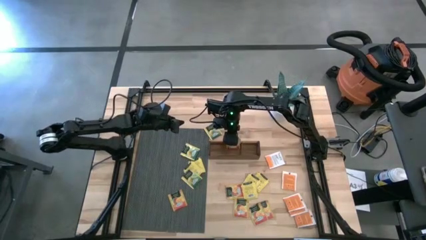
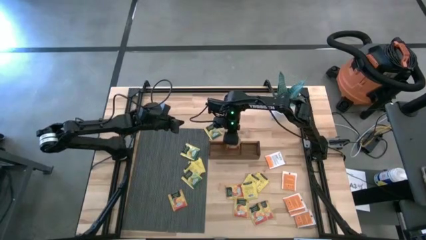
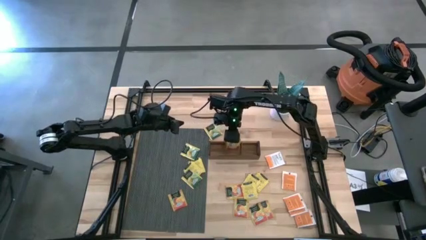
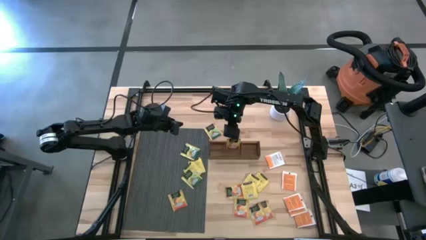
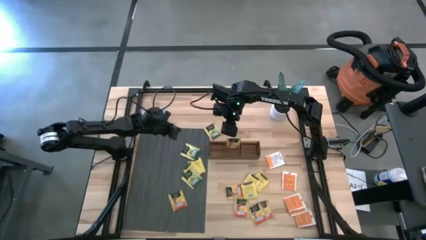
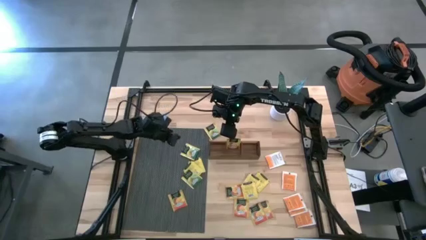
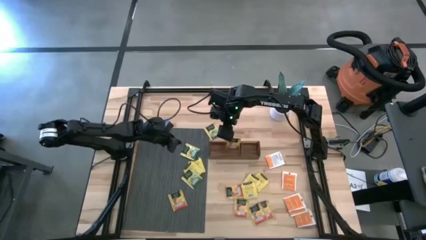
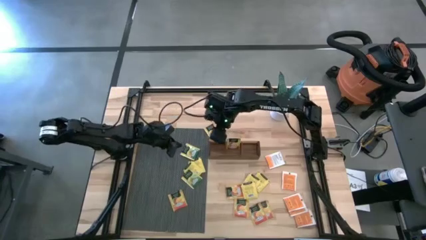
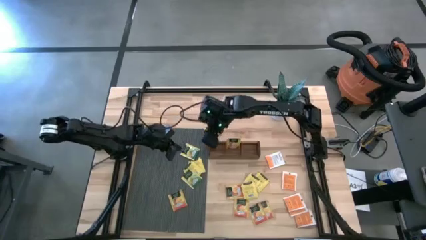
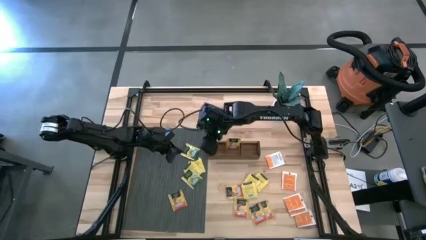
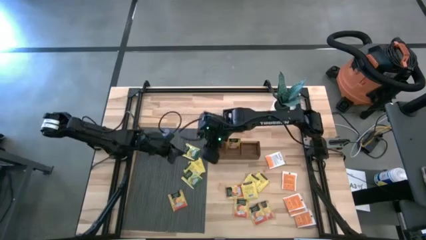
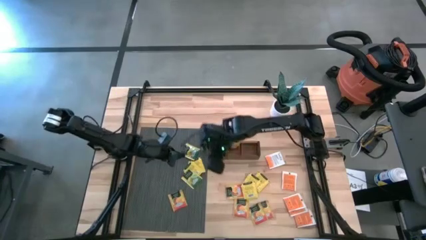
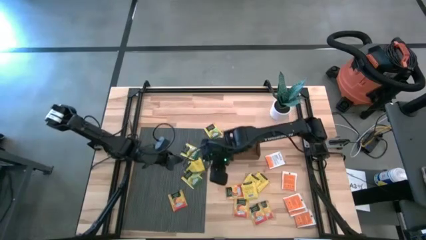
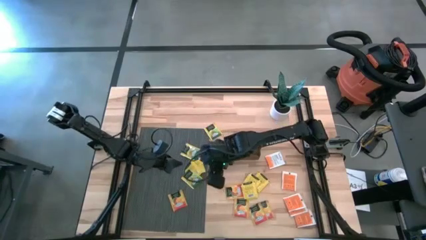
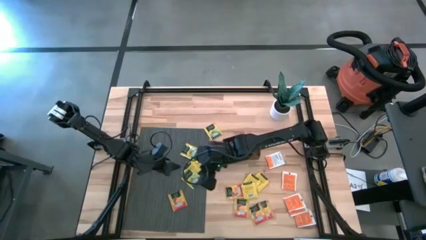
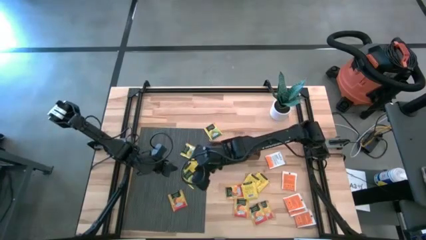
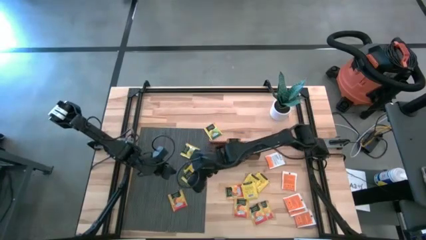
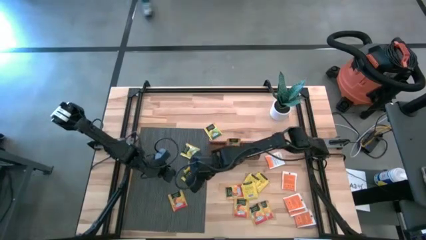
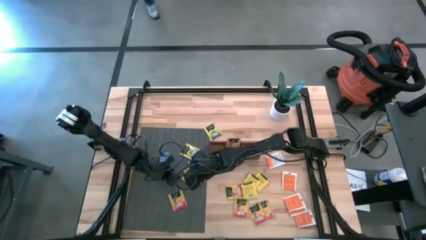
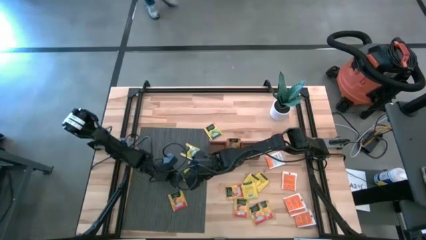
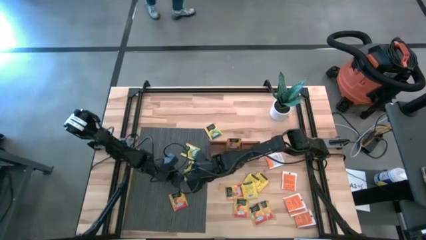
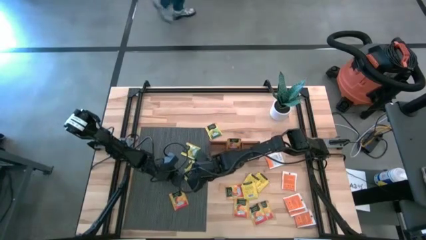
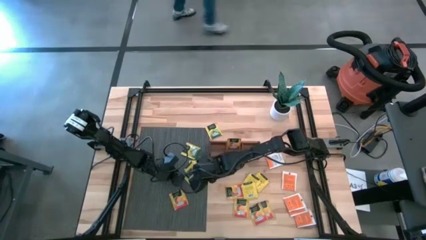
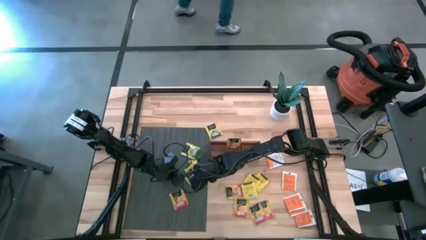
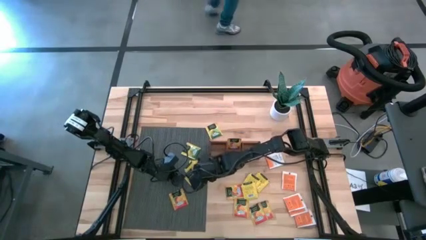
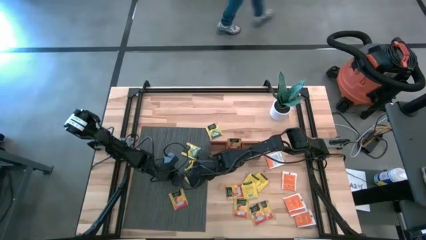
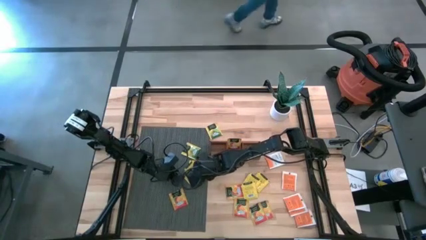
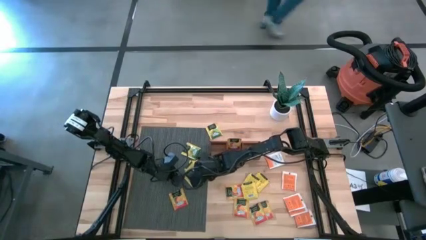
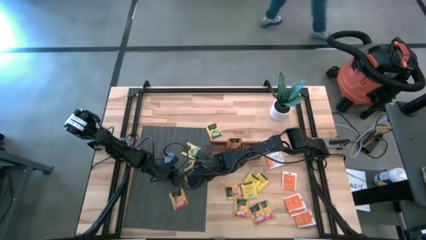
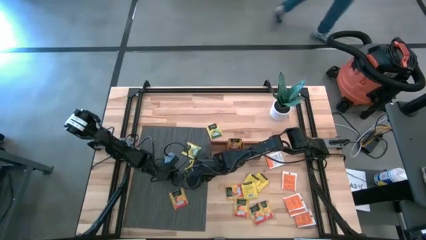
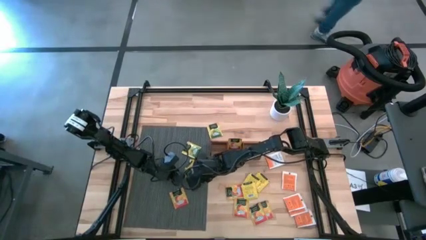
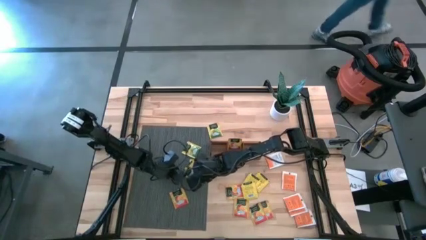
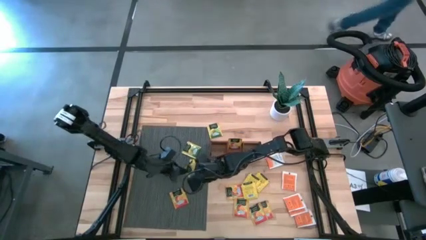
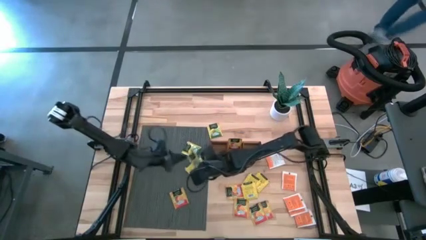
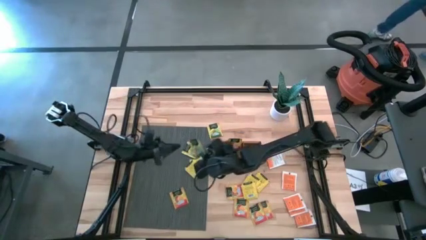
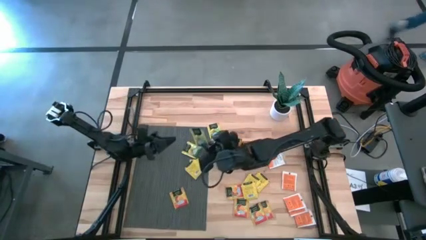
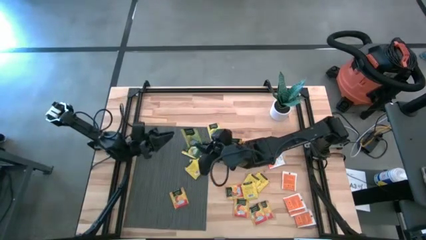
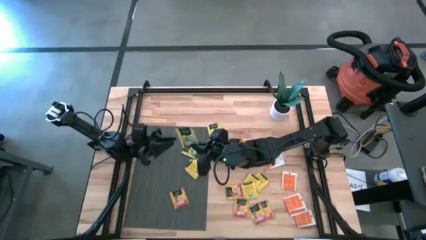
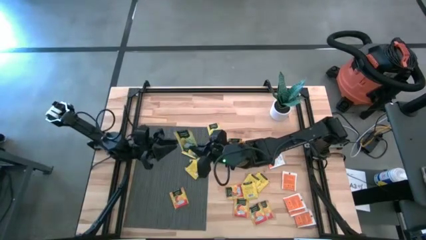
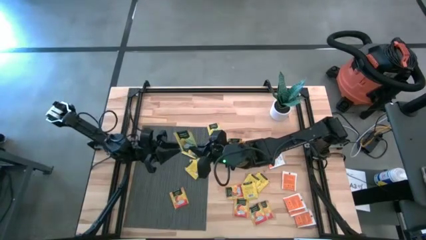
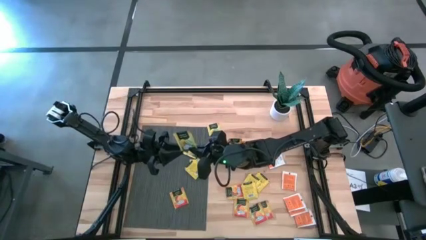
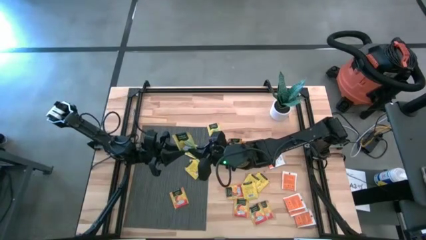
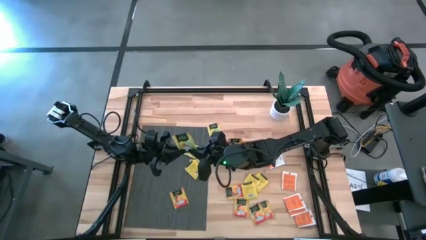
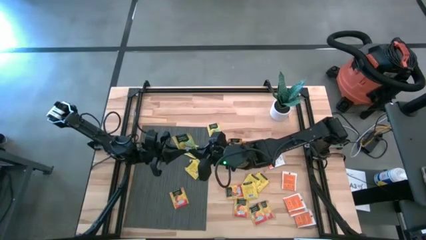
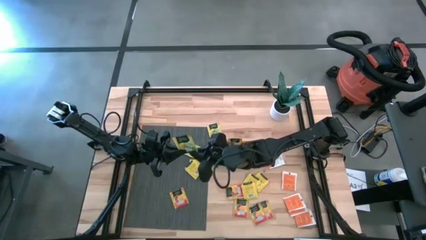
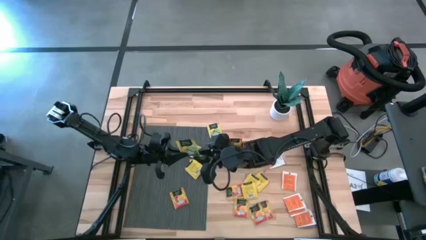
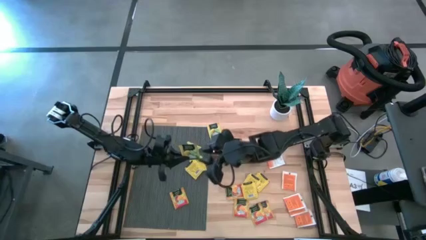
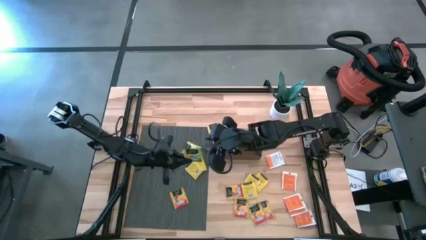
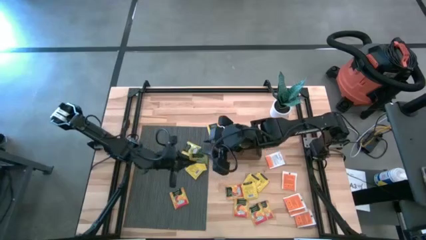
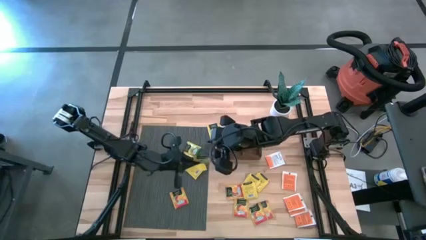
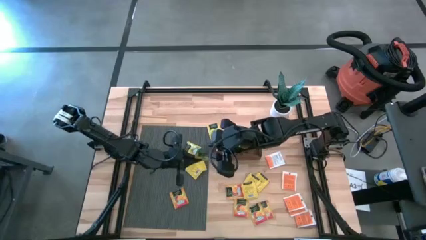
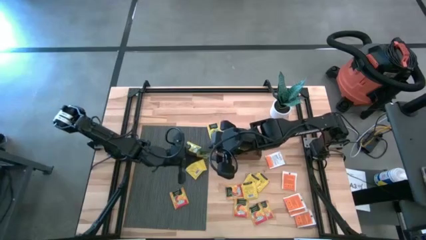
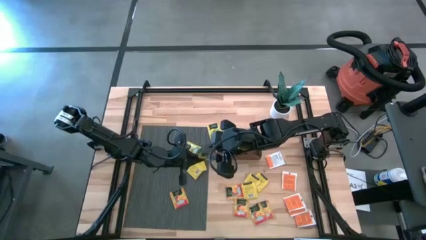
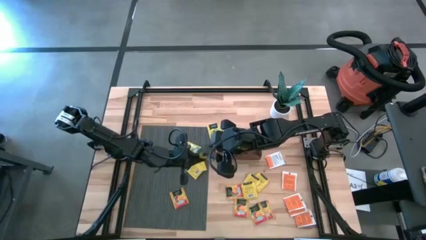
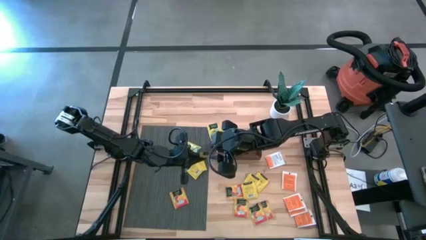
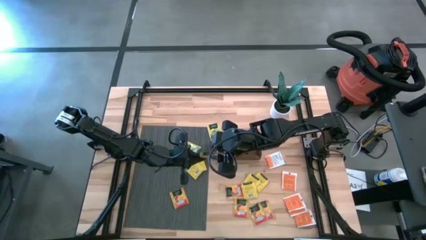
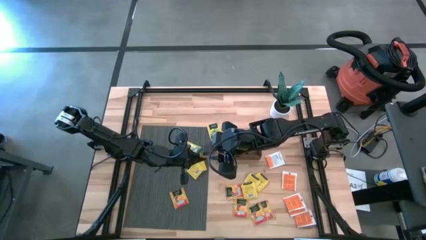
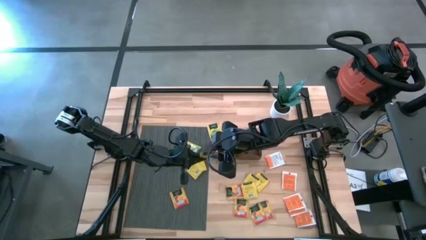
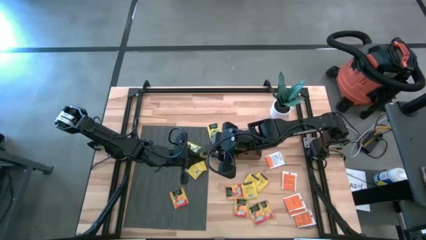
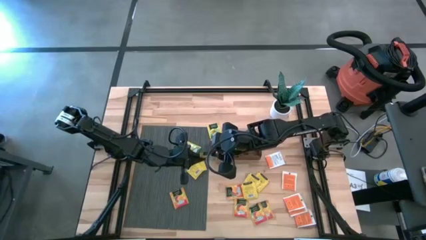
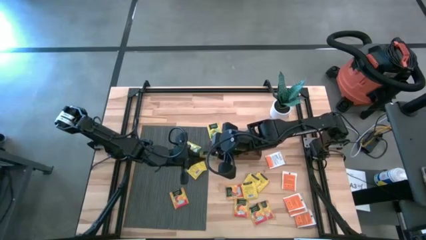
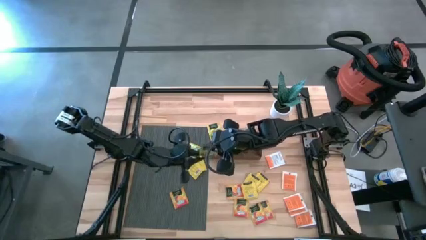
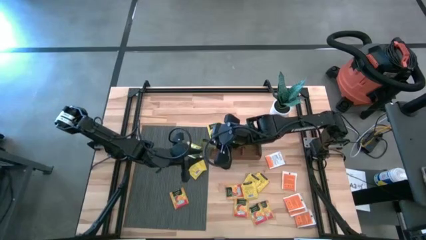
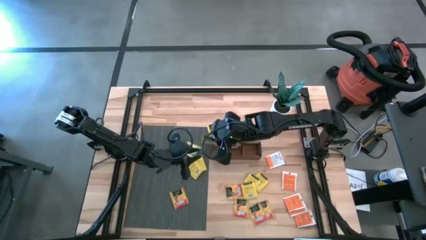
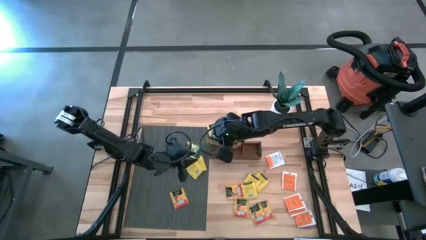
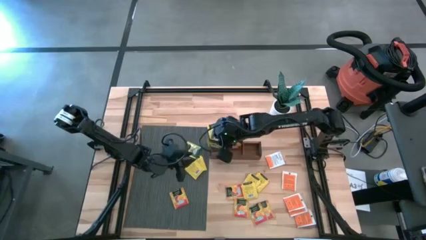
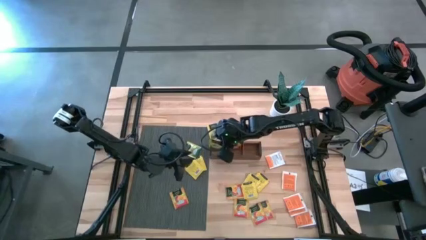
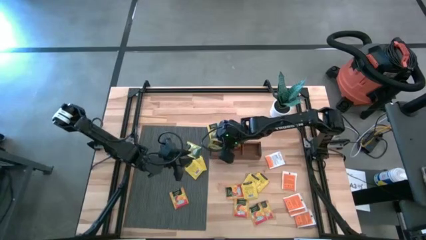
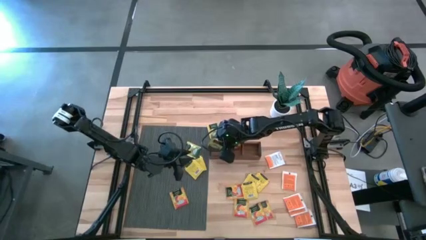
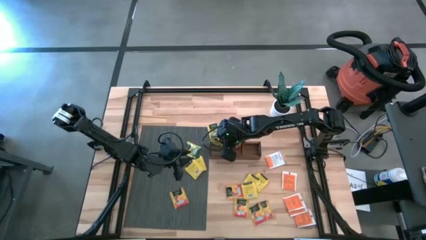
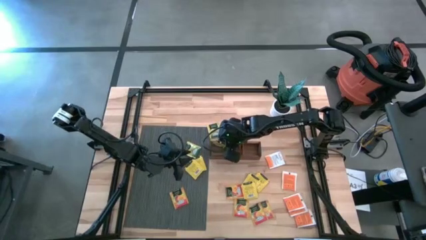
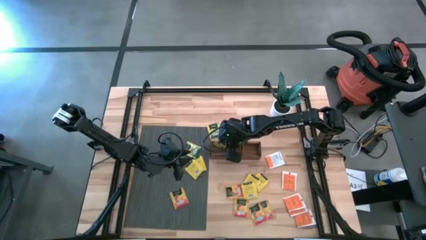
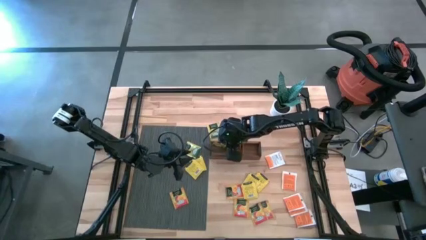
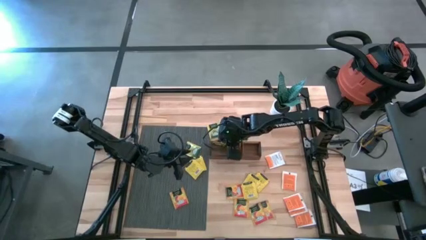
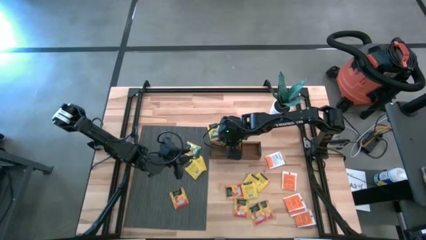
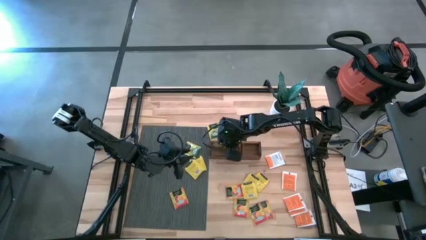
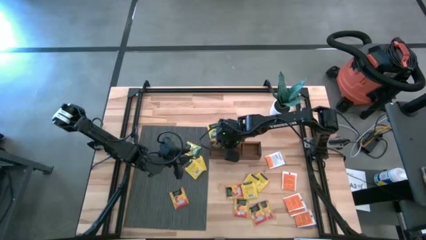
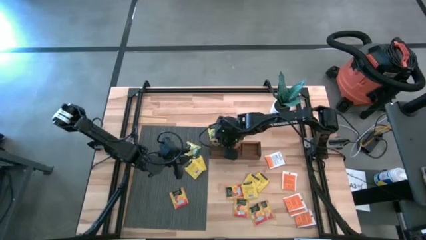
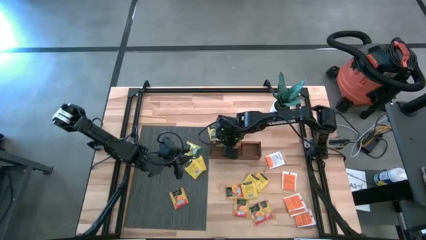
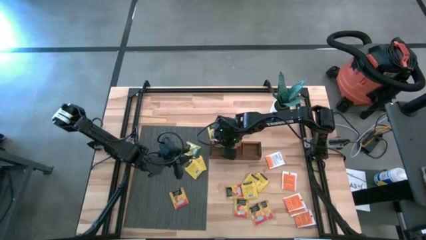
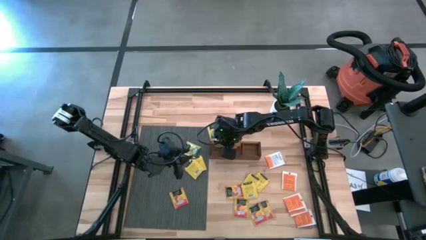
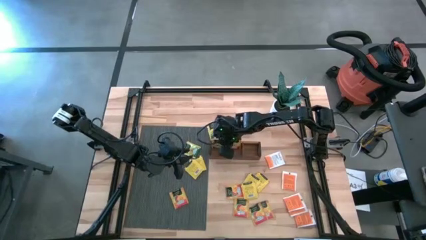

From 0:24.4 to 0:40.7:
Task: Pick & Place Tea
Put the yellow tea bag into the middle section of the wooden organizer

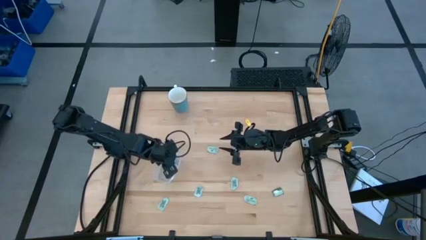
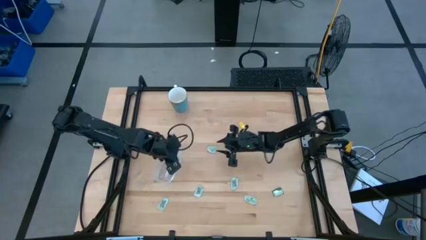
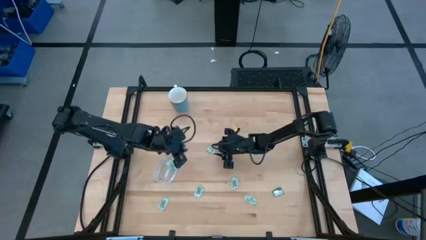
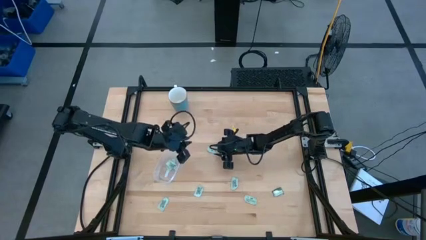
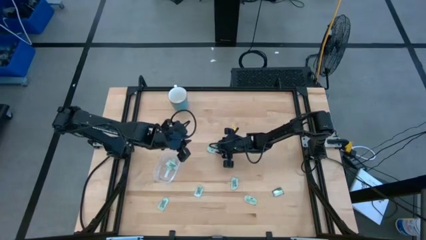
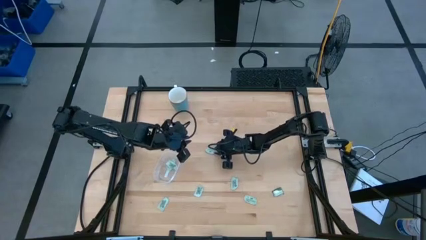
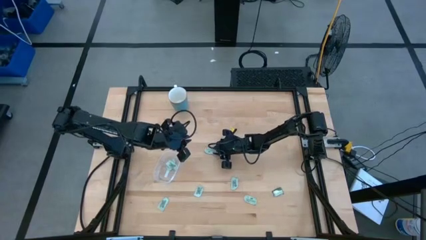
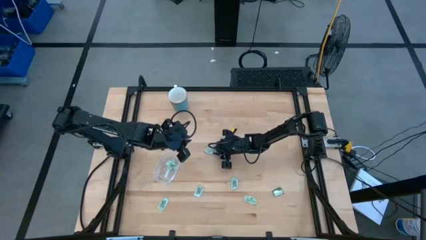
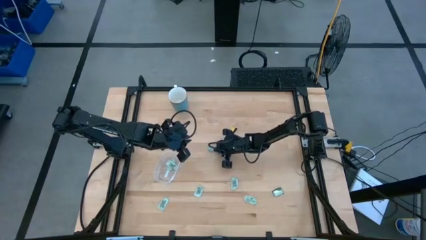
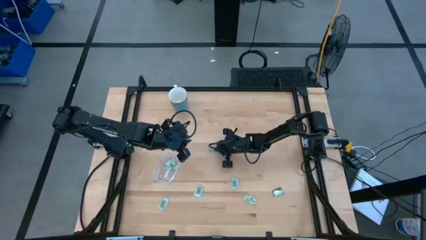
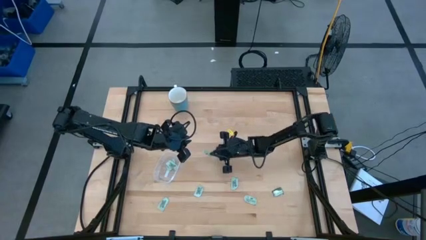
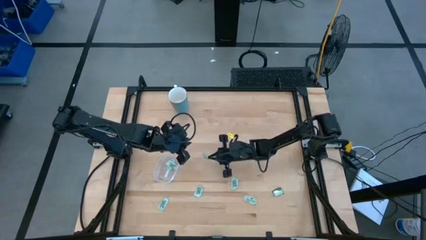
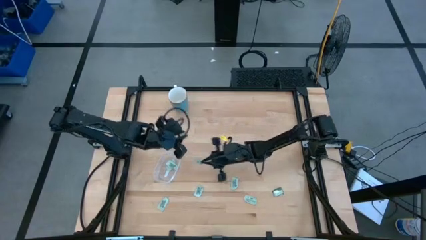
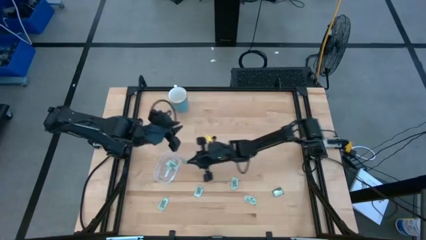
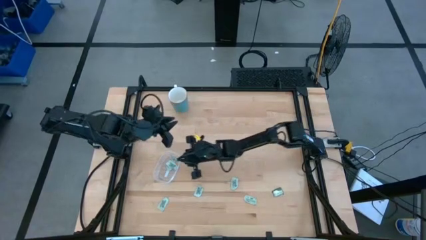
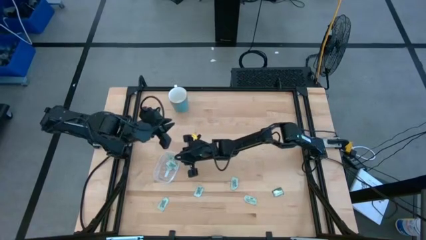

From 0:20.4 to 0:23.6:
Task: Pick and place Stevia / Truvia into bins
Put the stevia packet into the transparent container
